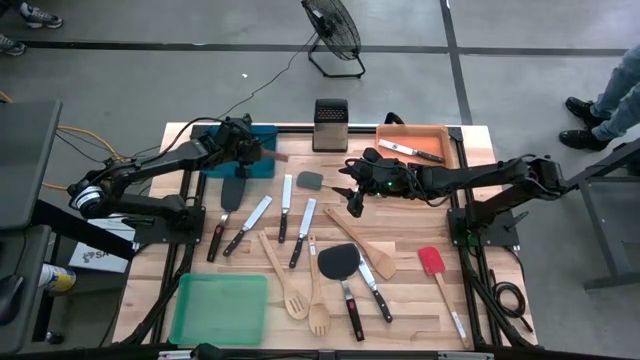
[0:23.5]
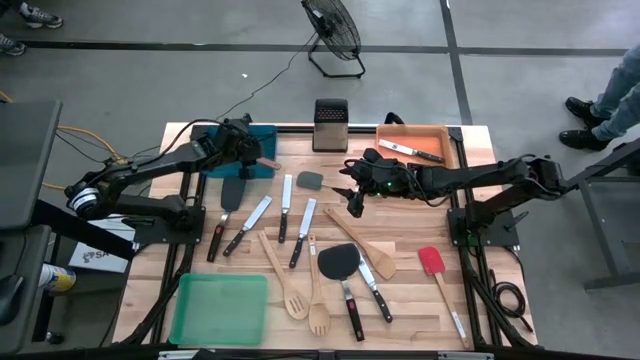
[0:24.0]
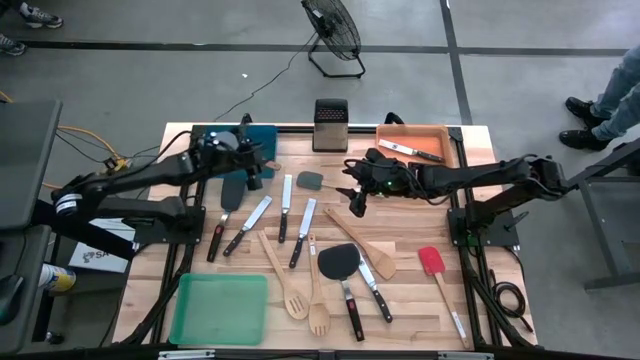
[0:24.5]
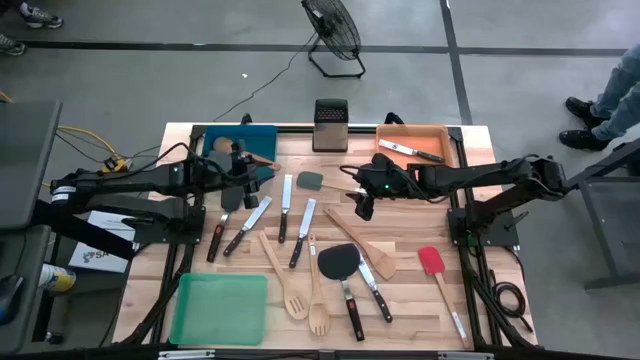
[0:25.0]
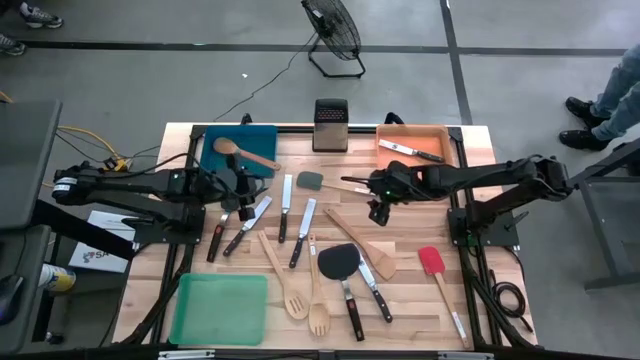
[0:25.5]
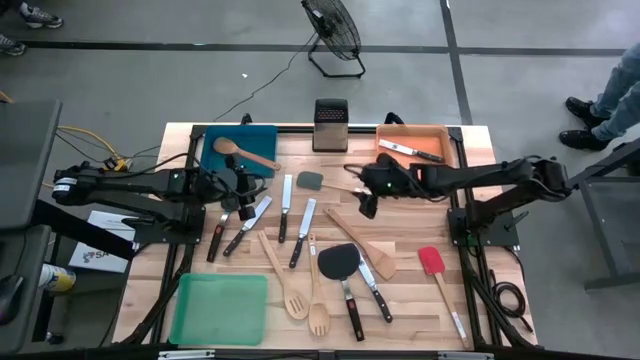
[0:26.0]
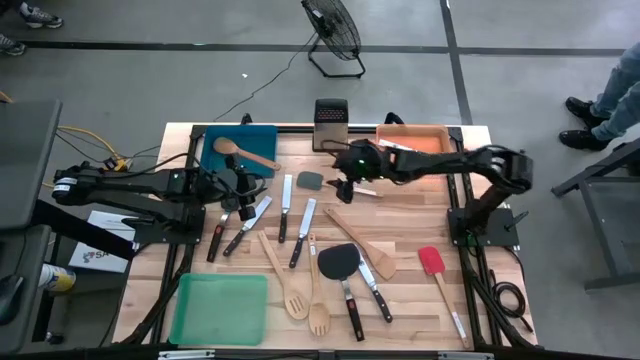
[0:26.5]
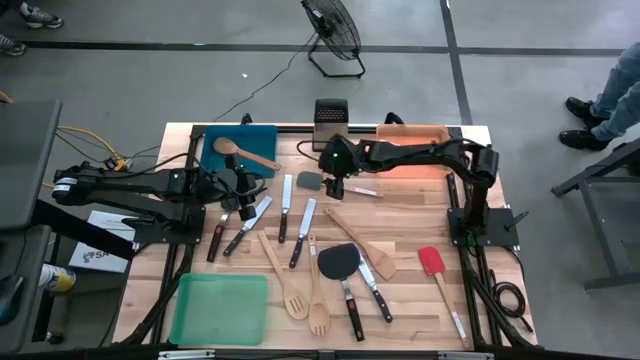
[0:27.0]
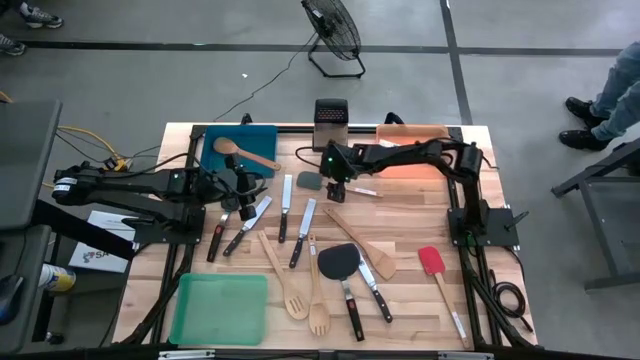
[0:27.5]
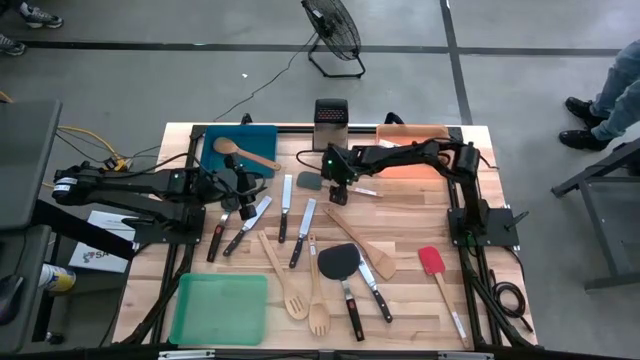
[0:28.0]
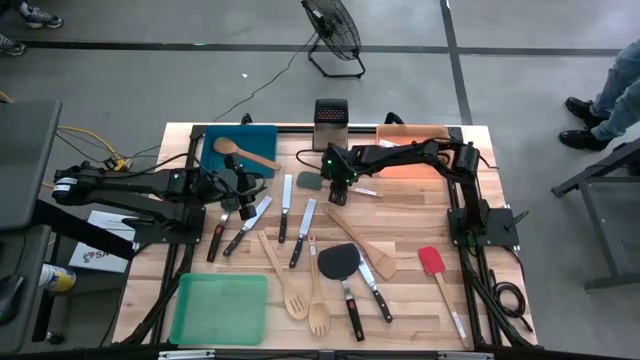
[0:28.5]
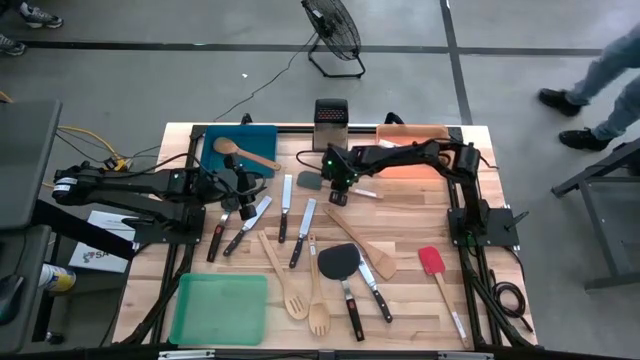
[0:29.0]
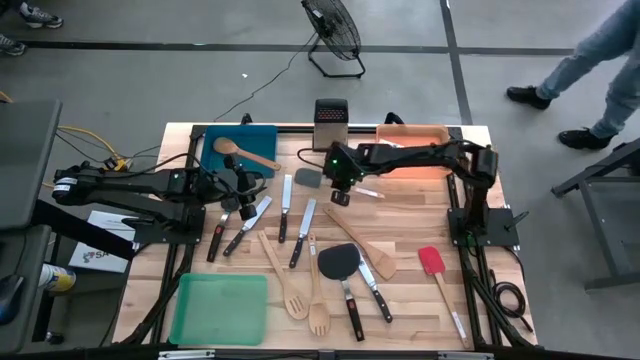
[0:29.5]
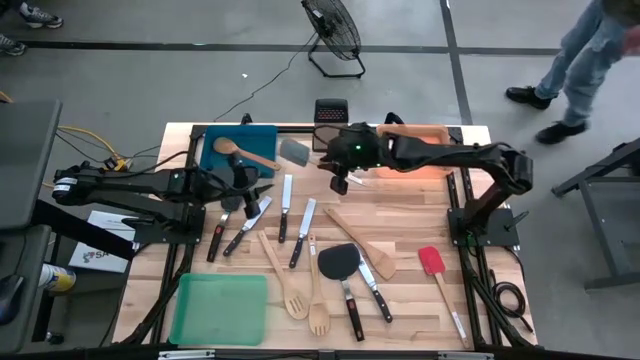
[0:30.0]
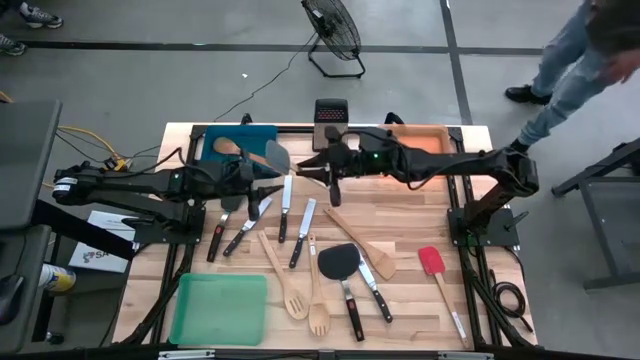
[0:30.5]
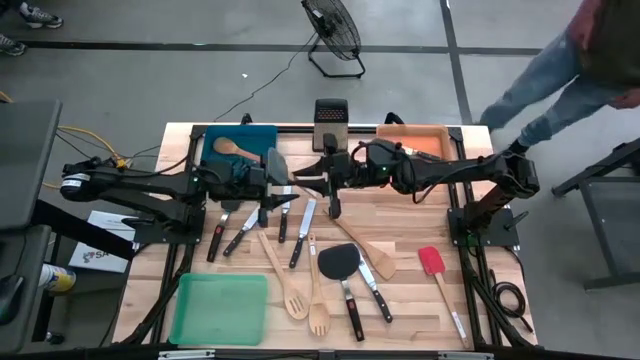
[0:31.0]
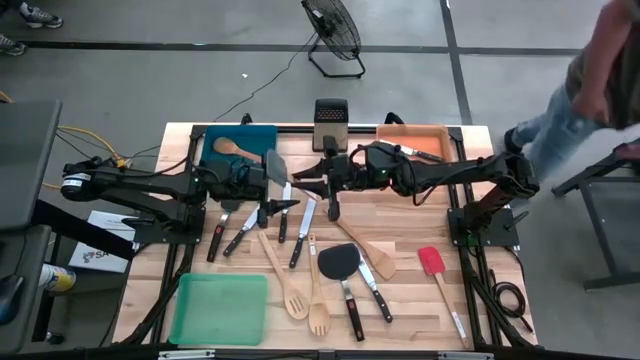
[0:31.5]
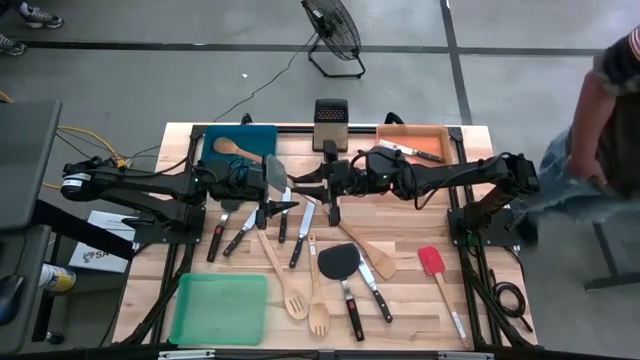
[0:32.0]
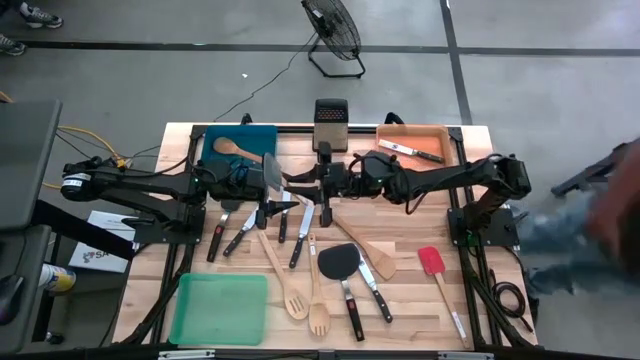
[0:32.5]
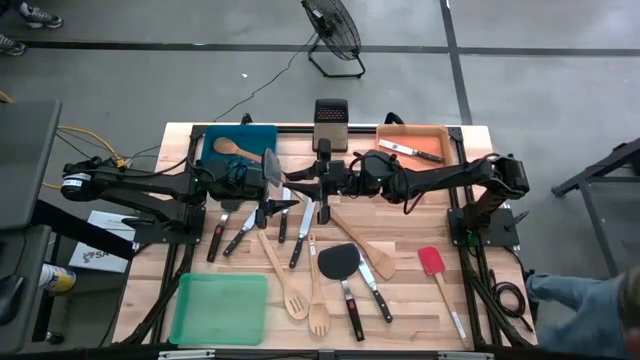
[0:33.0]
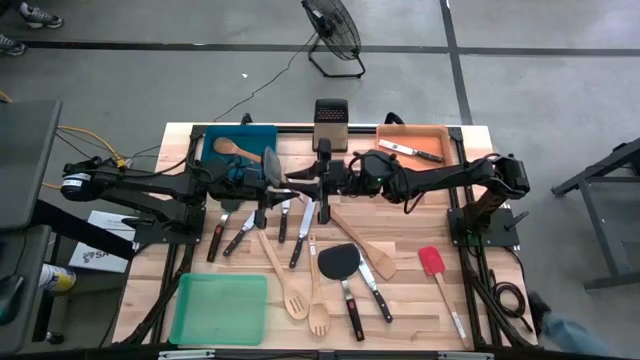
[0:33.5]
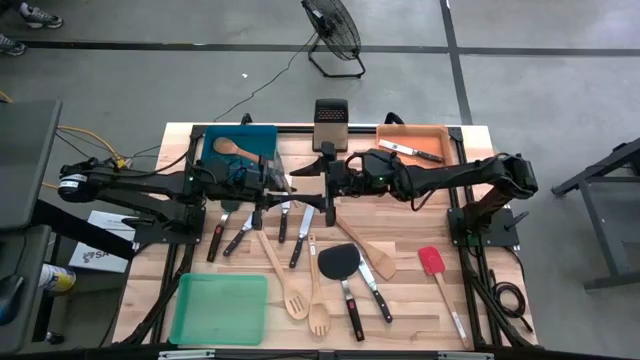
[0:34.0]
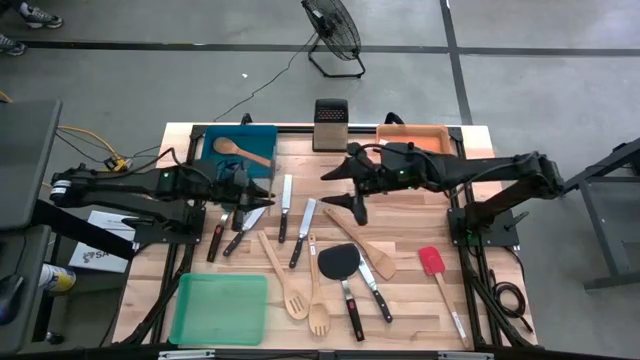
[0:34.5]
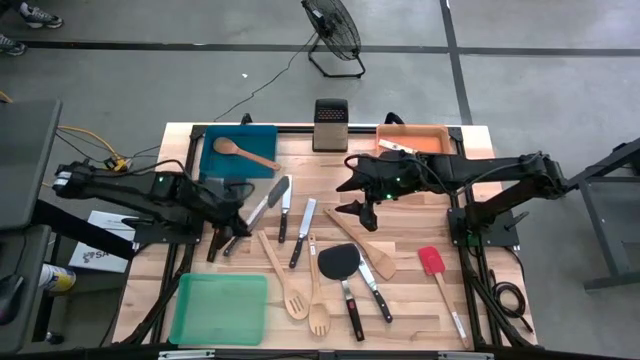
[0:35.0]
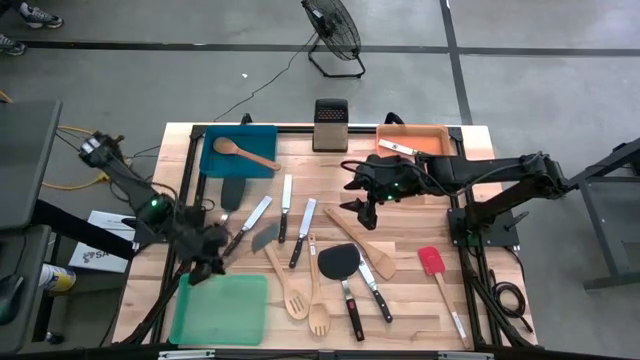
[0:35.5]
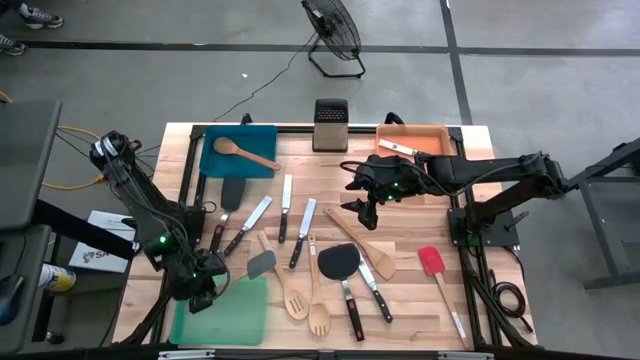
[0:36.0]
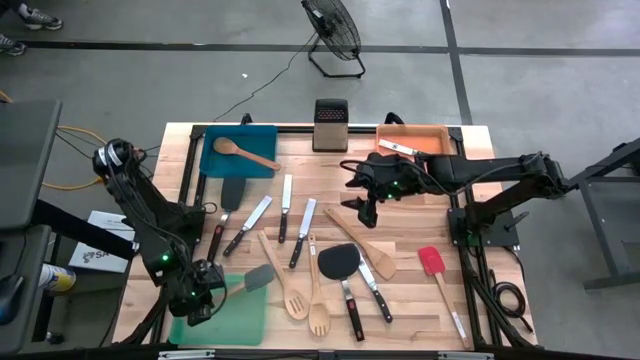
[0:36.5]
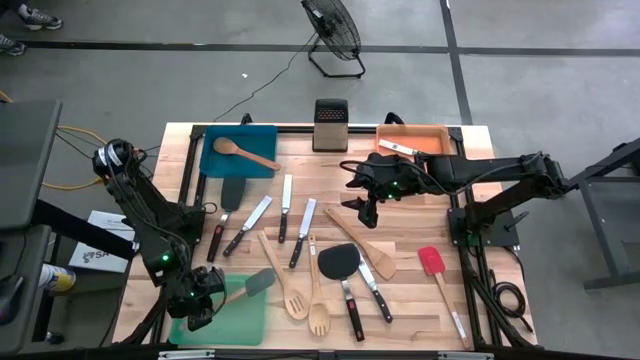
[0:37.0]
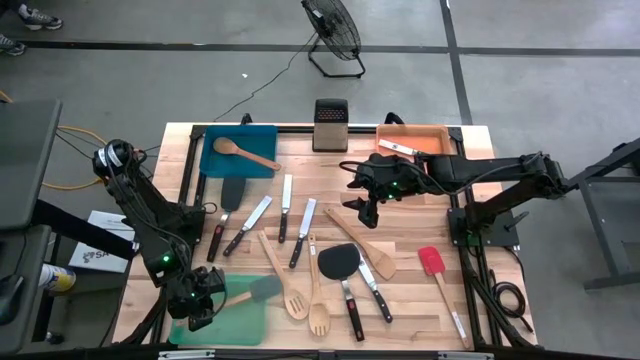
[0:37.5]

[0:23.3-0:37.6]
Task: Pick & Place Kitchen Items
Put the grey spatula into the green bin

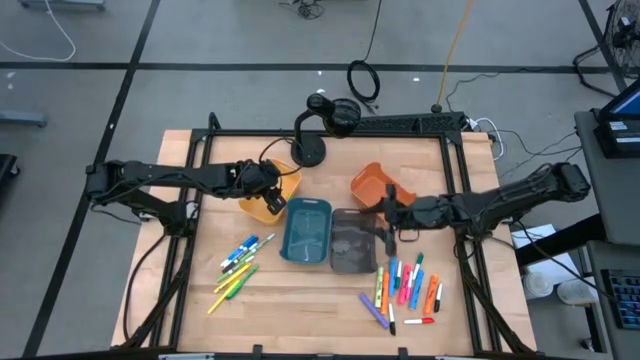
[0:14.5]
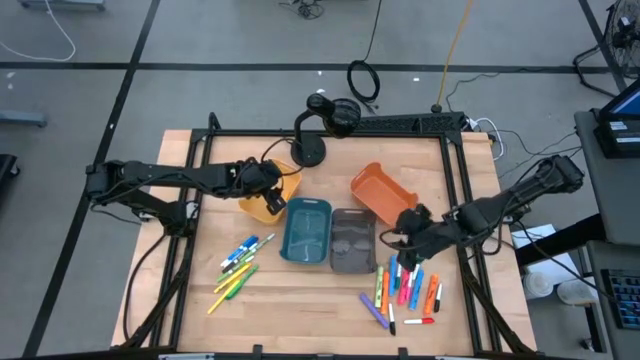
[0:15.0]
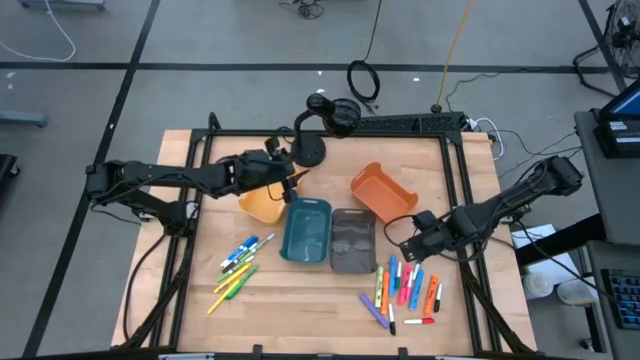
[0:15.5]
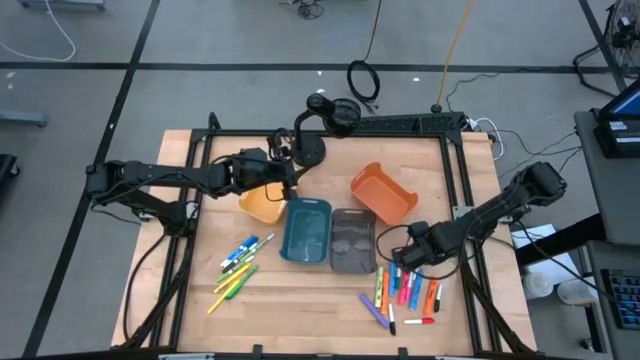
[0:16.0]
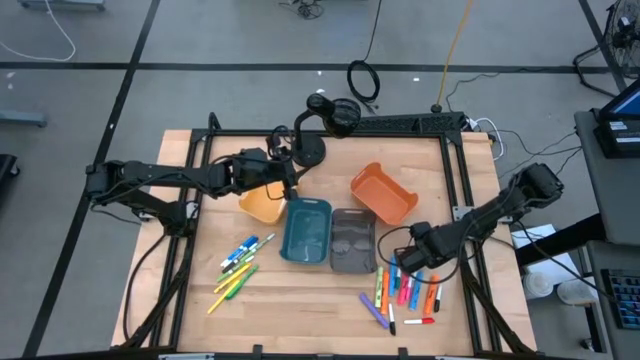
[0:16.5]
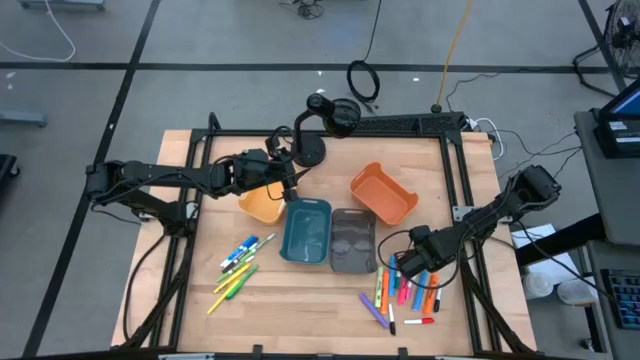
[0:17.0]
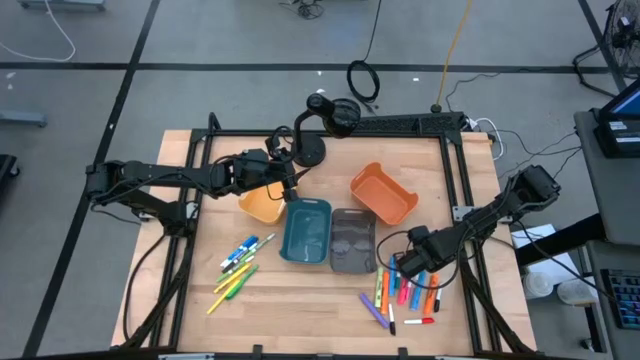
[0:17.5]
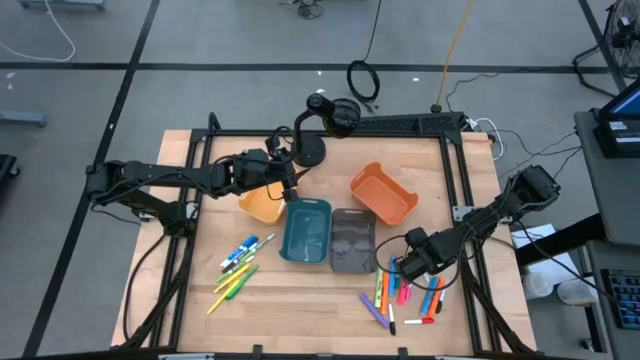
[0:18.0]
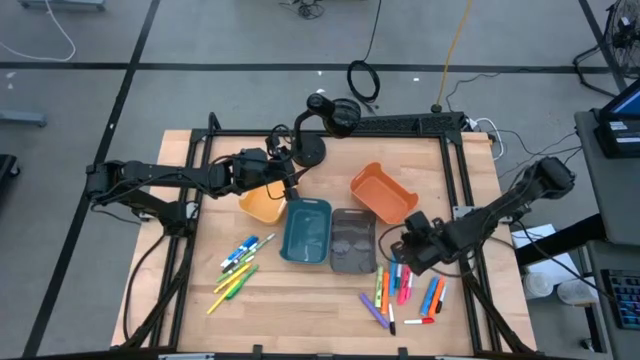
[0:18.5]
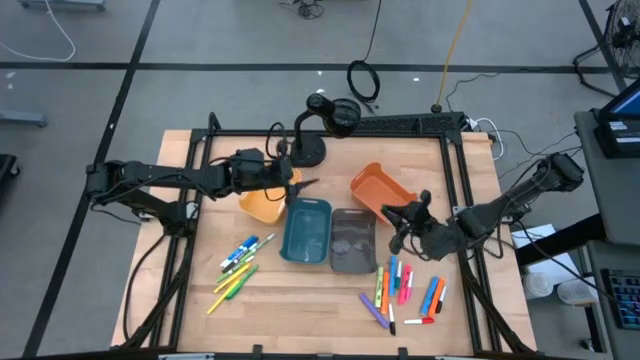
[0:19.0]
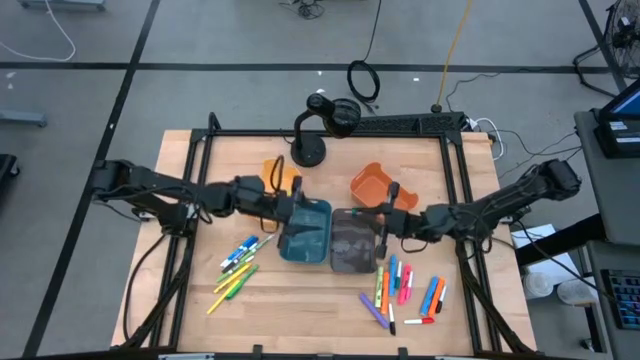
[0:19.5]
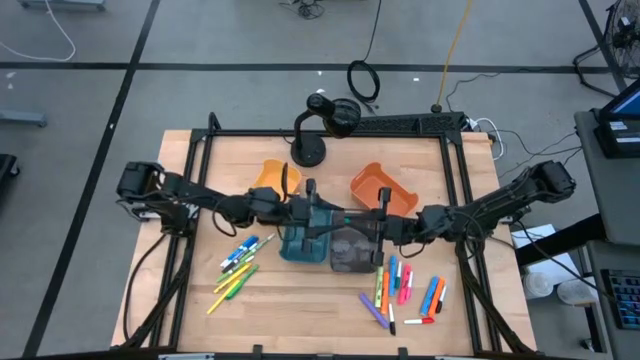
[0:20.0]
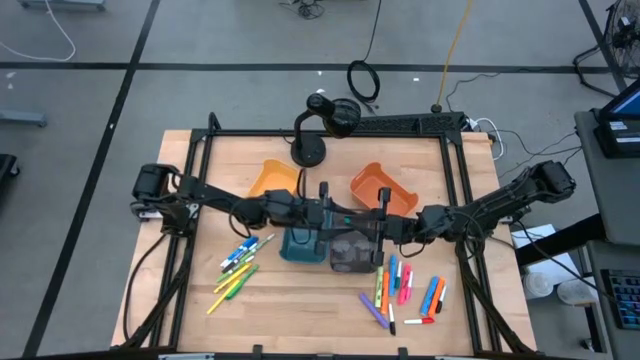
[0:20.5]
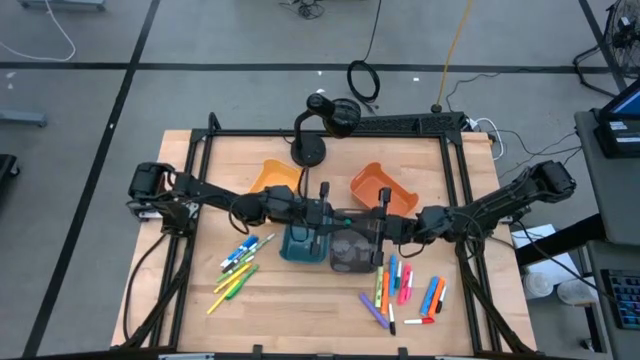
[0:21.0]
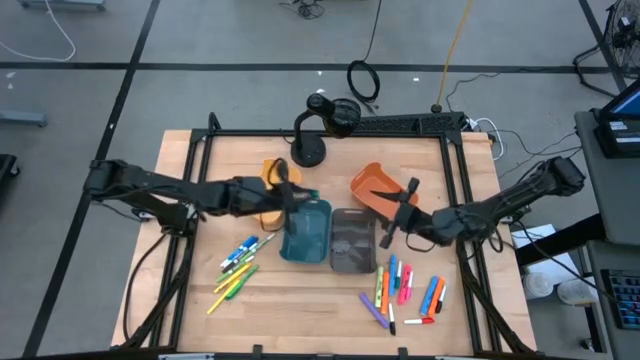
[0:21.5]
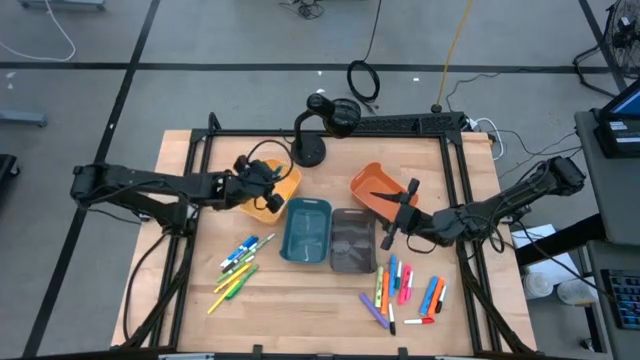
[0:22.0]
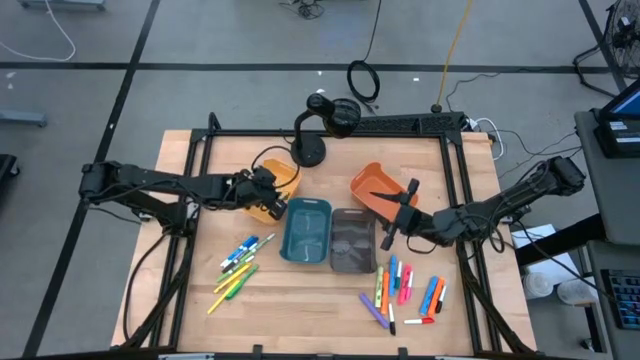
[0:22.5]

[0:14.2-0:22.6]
Task: Pick & Place Markers
Put the right white and green highlighter into the yellow bin
